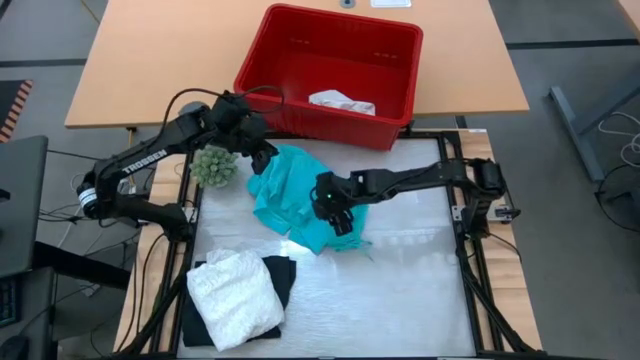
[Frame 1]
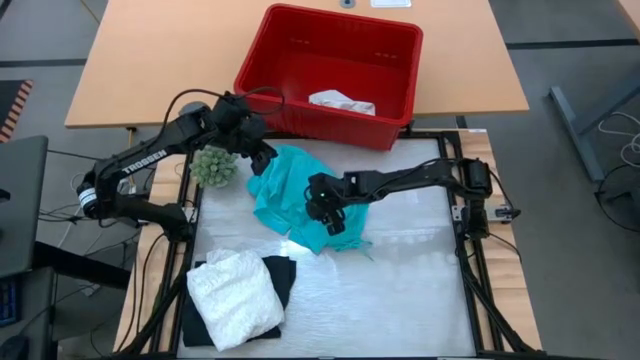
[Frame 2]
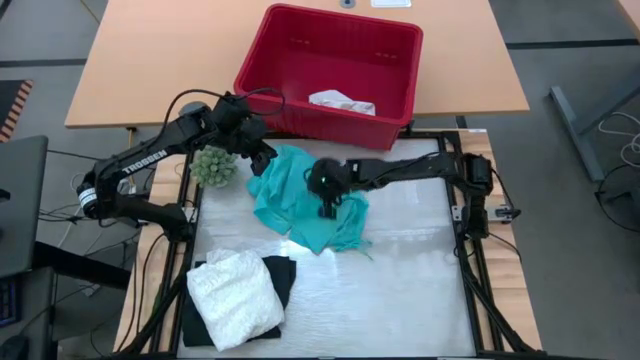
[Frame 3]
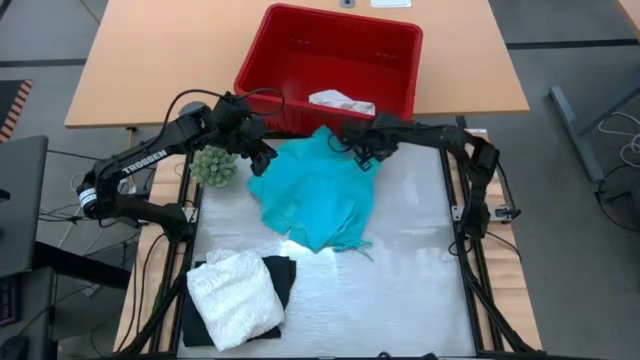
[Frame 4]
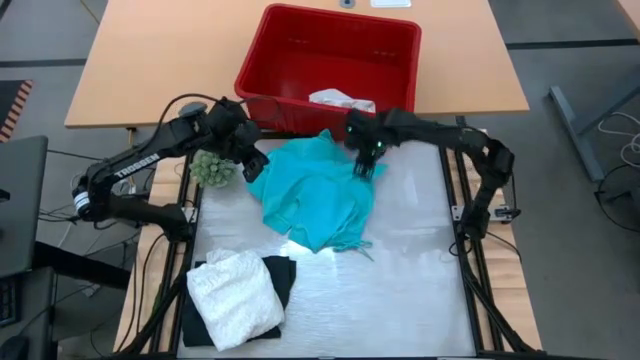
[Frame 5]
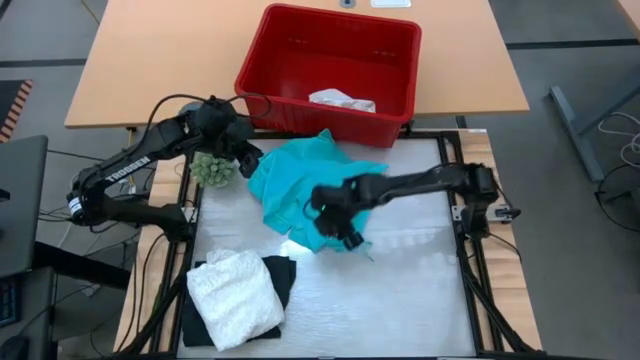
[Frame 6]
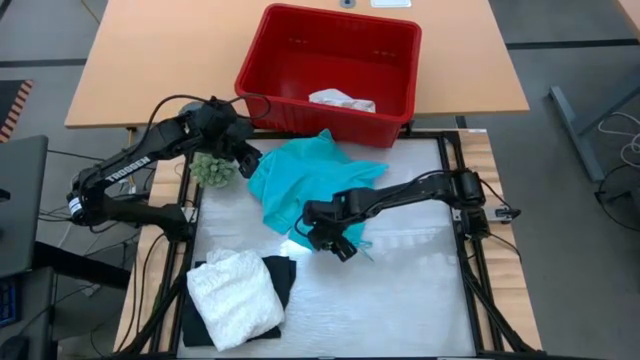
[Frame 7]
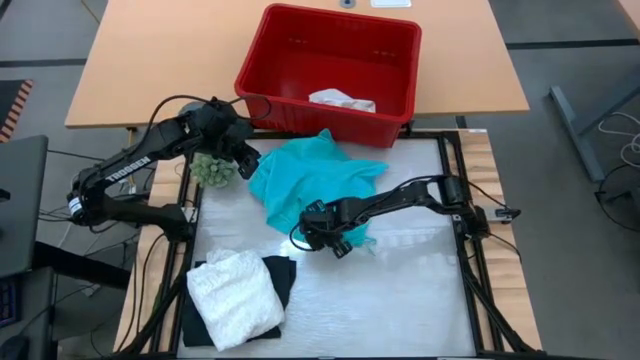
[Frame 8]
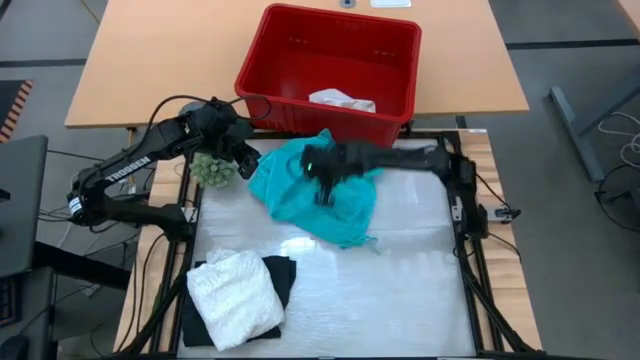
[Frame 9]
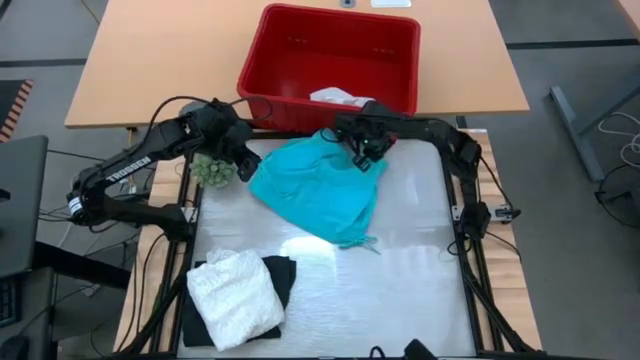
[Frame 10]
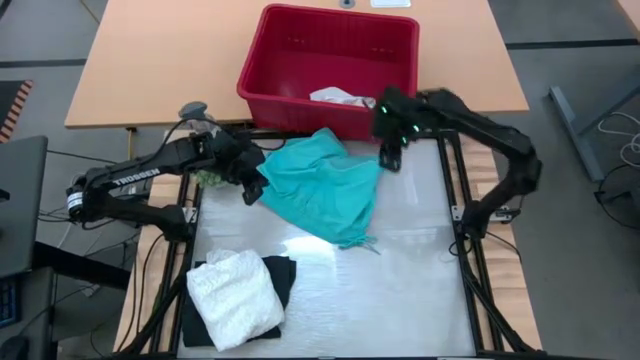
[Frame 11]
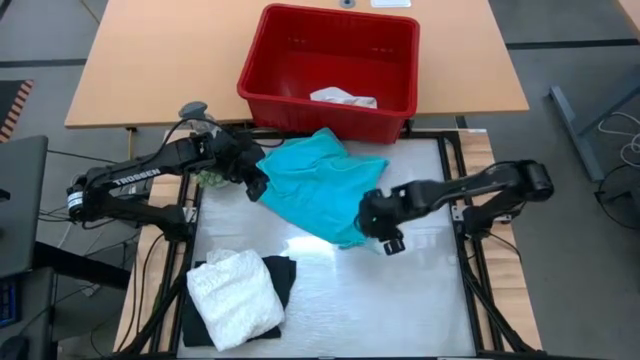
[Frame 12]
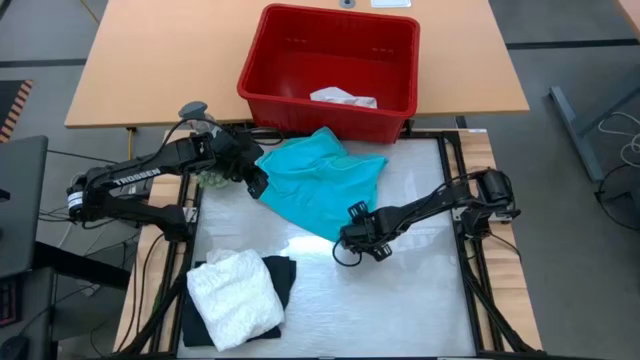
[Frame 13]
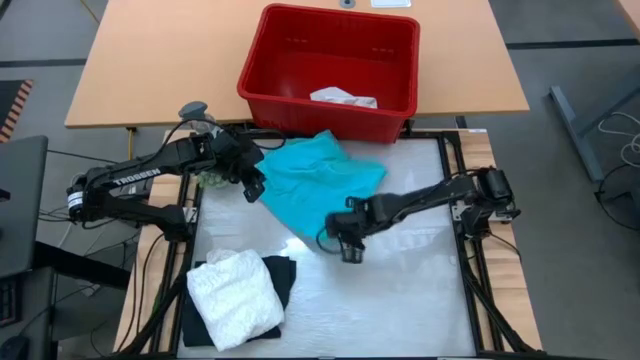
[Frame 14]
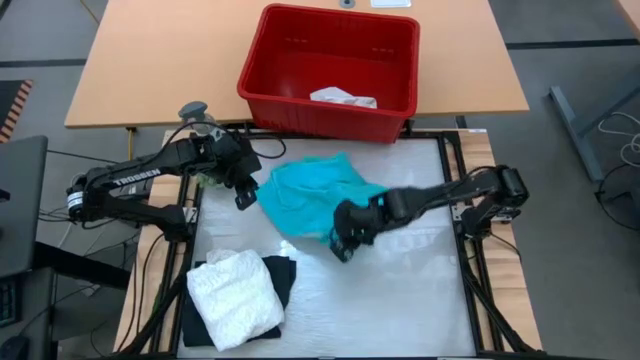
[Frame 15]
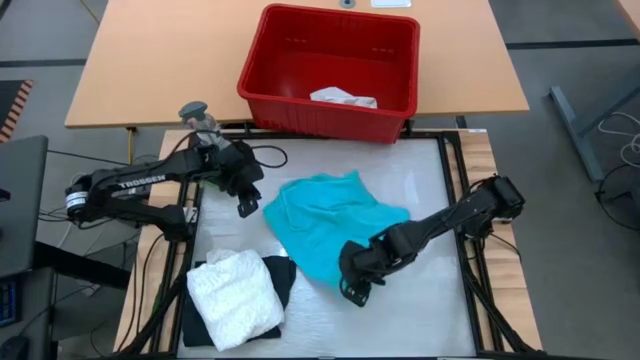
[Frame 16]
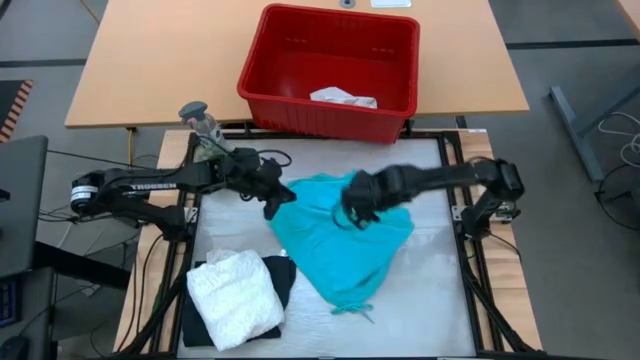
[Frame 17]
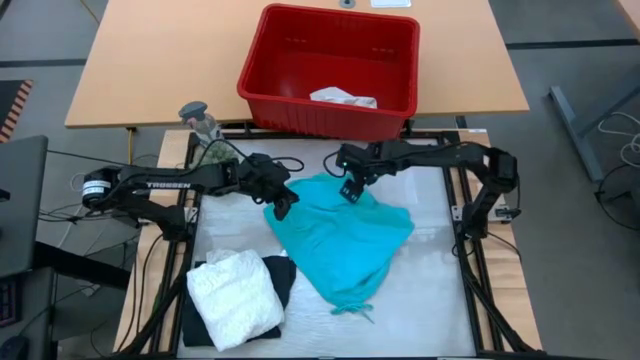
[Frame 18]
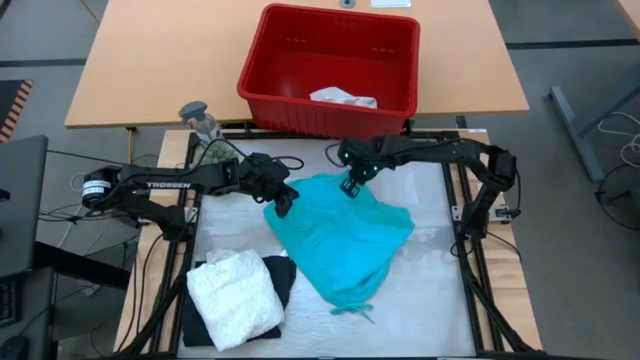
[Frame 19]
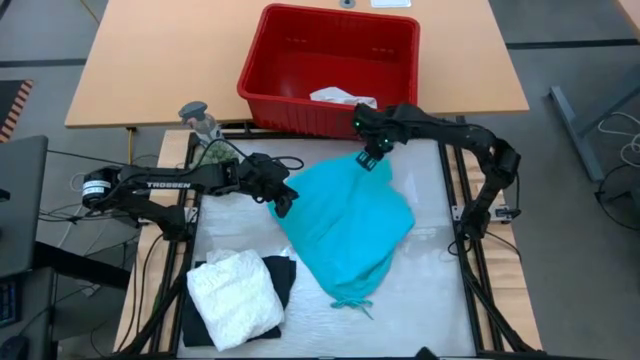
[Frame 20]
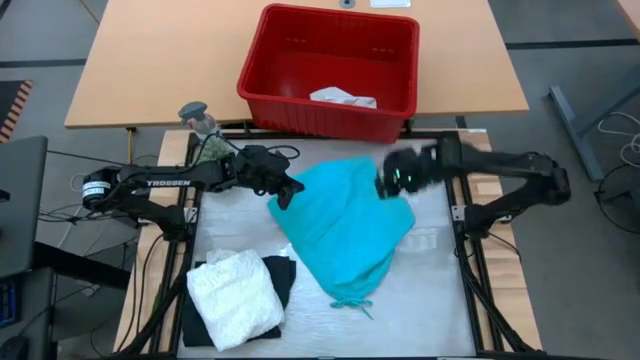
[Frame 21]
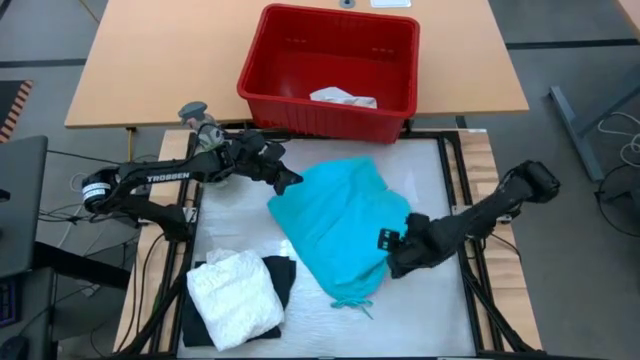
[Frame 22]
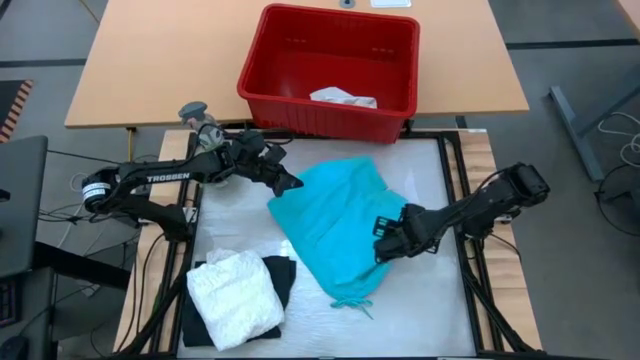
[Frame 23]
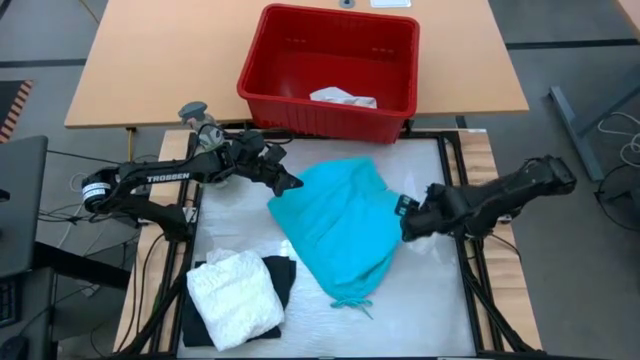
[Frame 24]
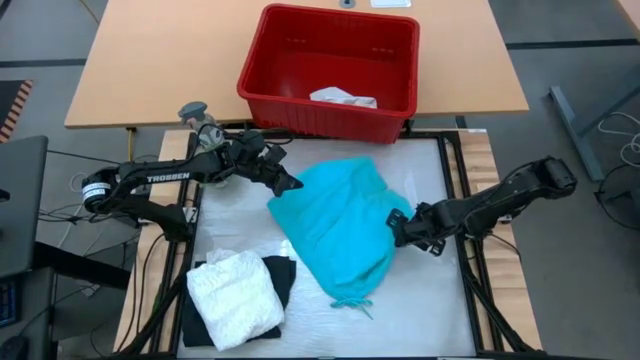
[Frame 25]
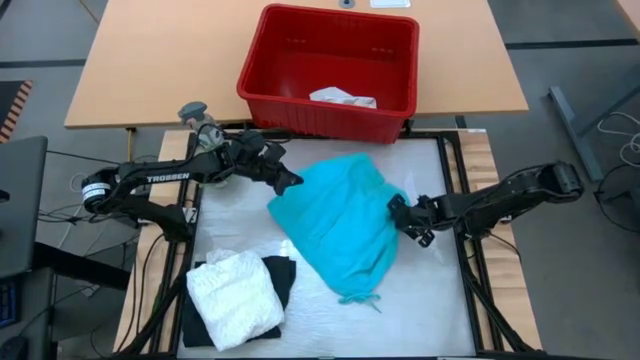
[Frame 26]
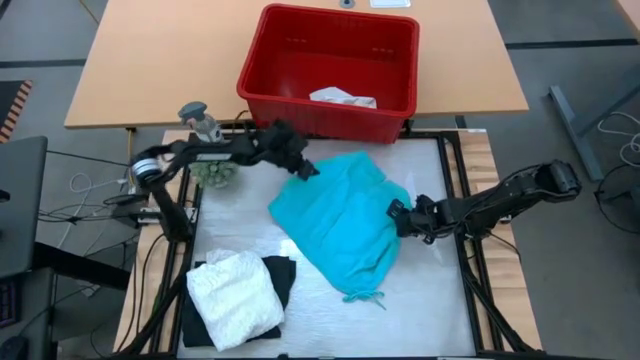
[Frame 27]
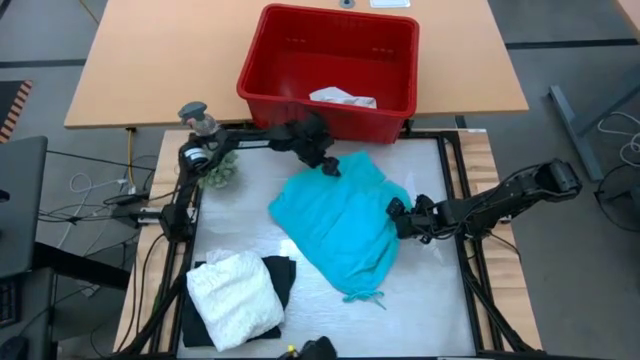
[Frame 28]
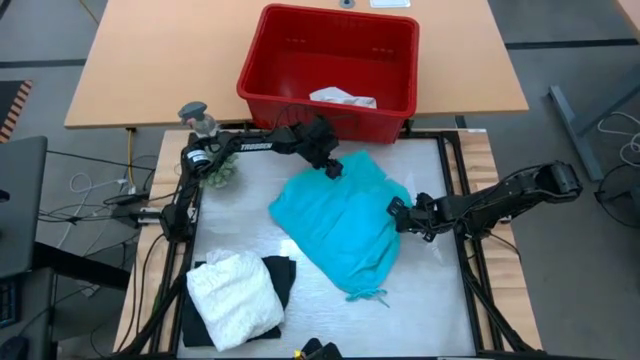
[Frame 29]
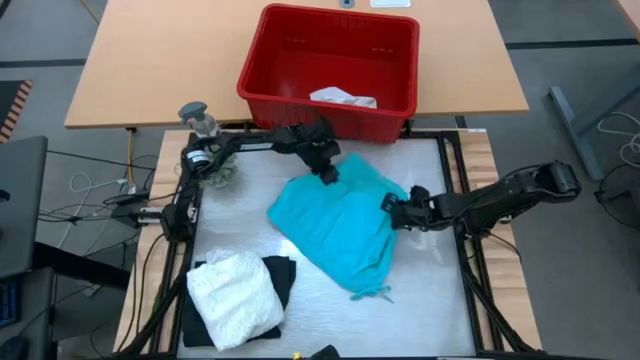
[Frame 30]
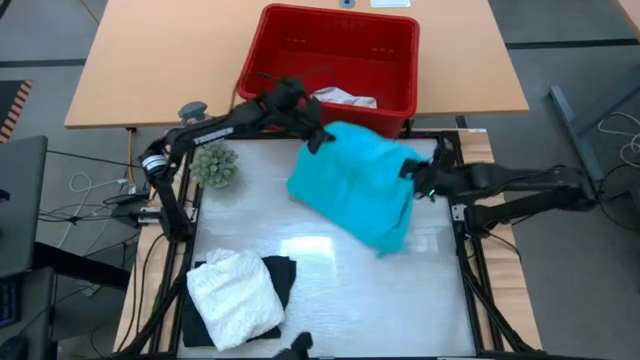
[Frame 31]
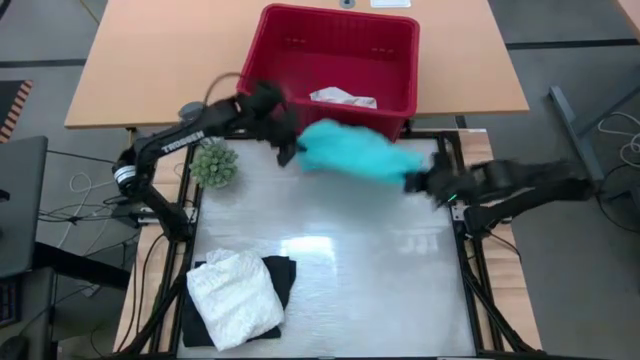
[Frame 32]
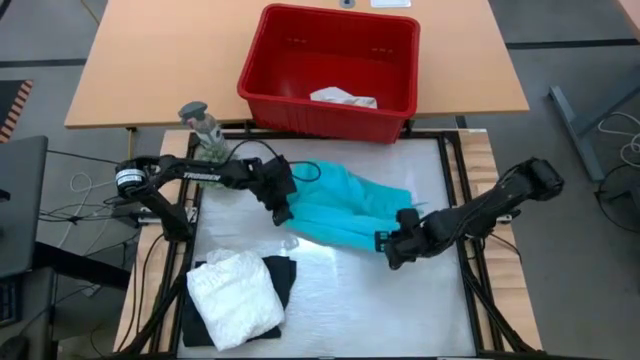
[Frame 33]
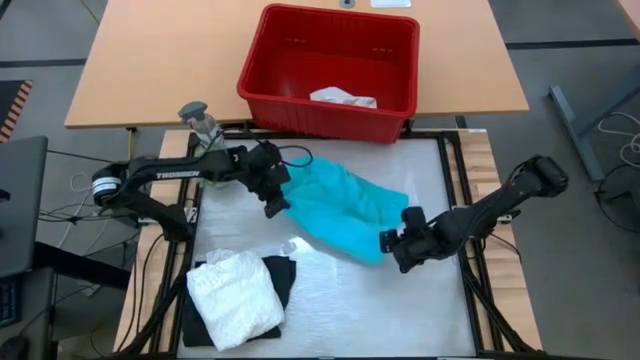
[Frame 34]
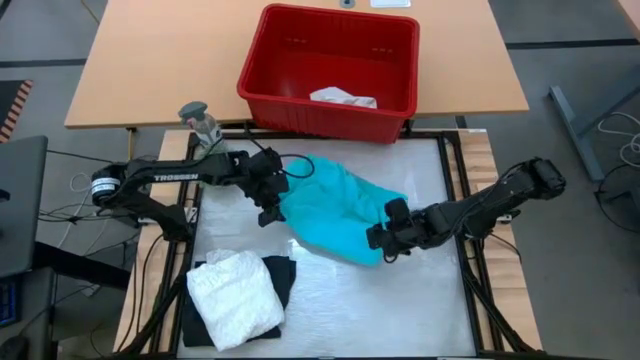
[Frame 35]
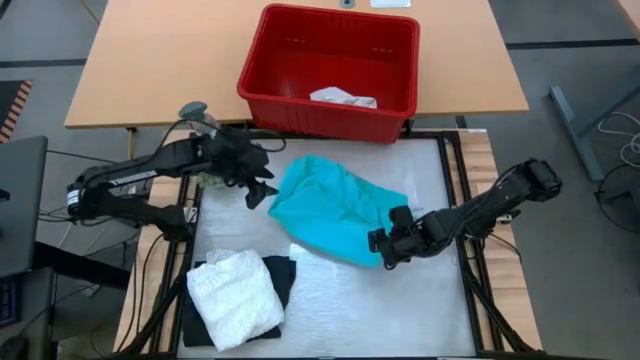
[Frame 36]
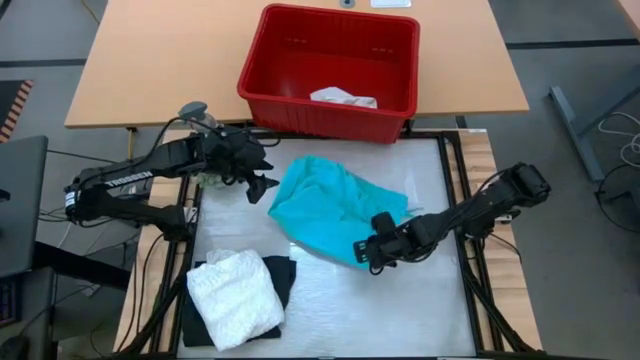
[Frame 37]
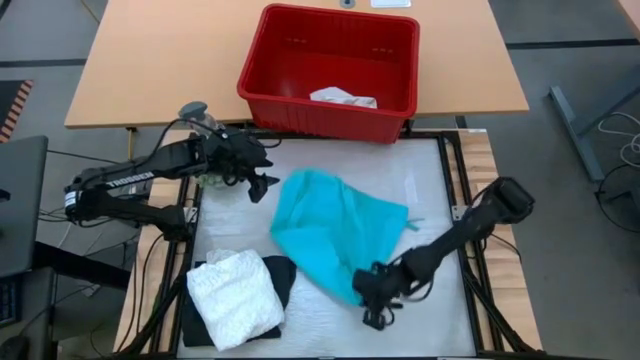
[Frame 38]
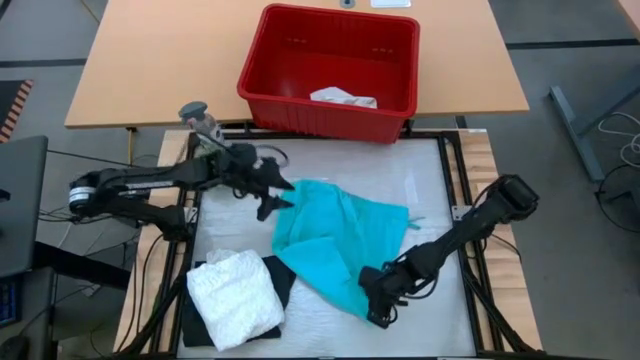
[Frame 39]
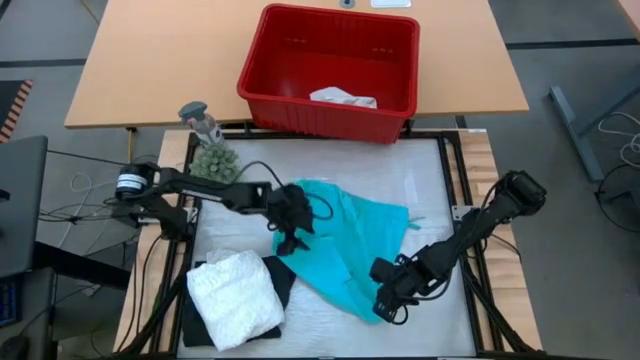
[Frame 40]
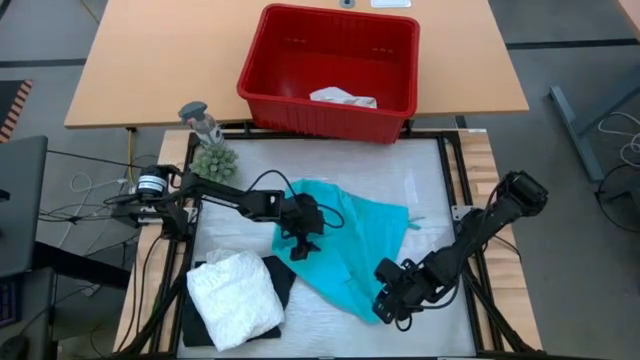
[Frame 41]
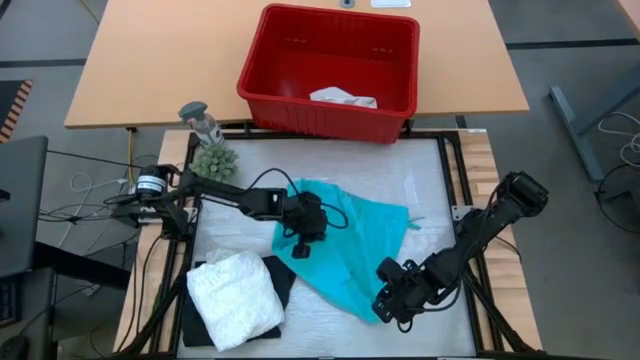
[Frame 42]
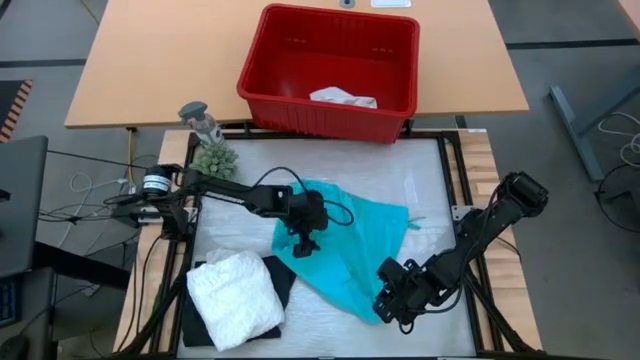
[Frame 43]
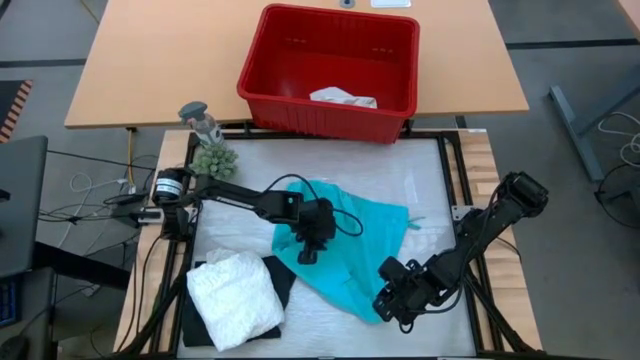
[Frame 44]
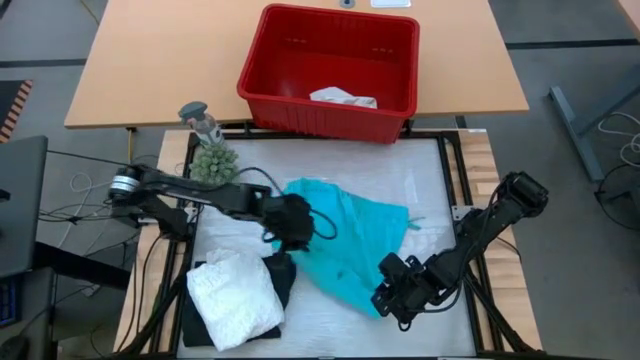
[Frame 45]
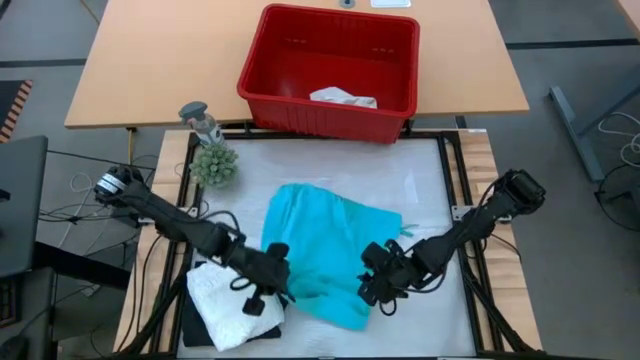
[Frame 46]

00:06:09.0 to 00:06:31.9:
Task: Fold Laundry from Bin
Fold the blue shorts
